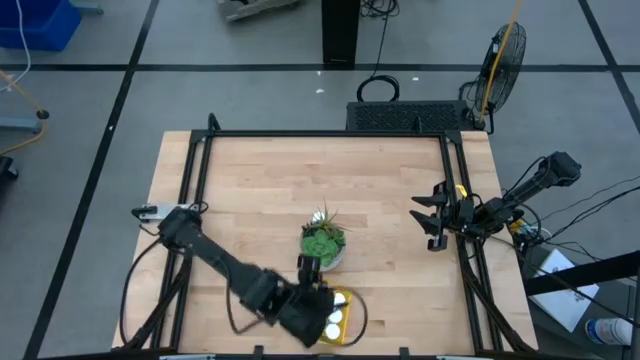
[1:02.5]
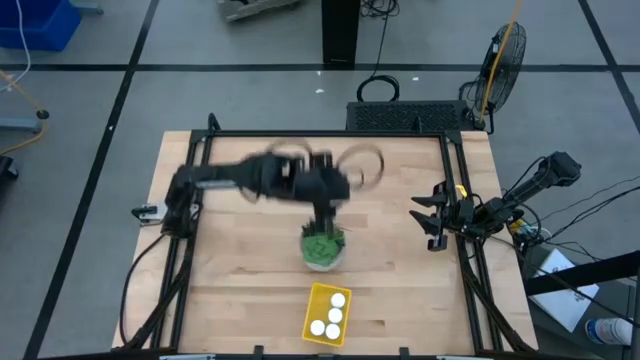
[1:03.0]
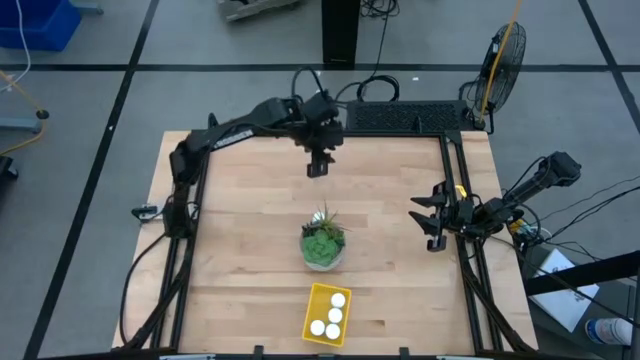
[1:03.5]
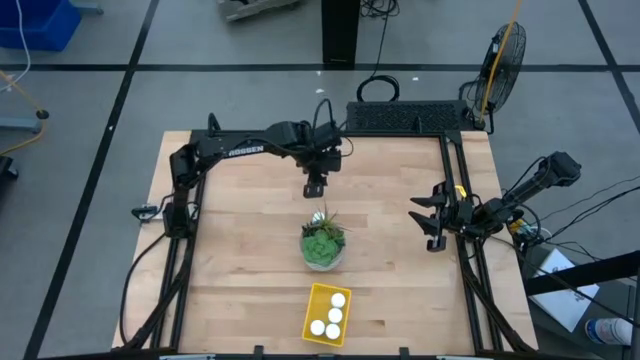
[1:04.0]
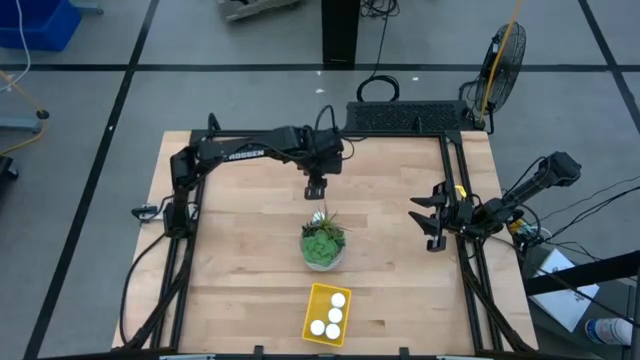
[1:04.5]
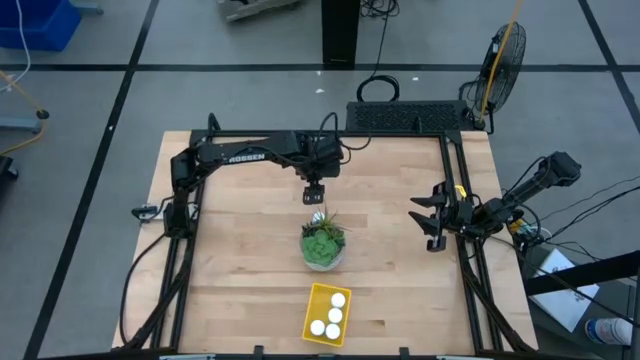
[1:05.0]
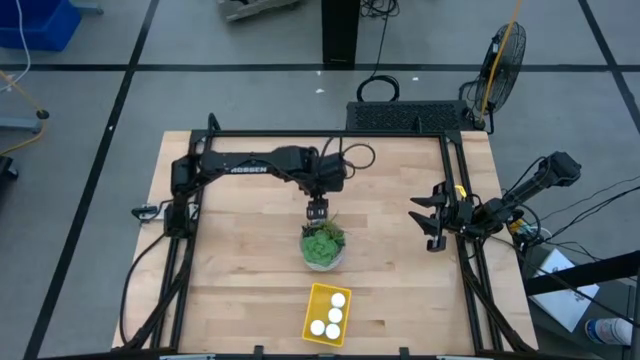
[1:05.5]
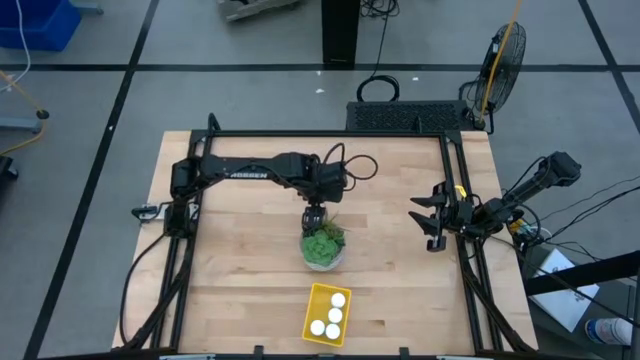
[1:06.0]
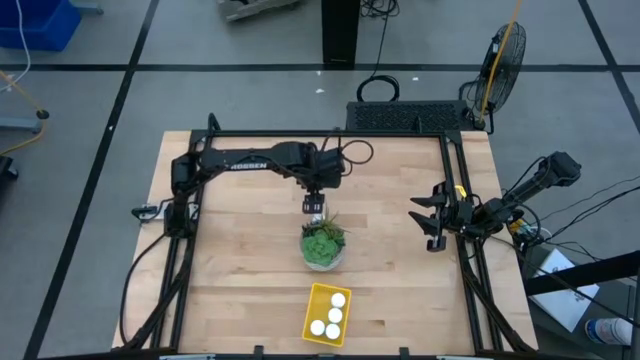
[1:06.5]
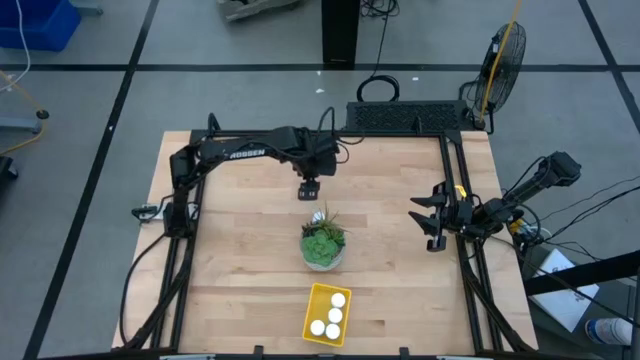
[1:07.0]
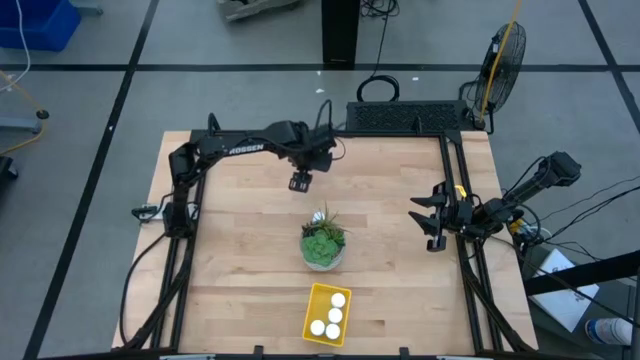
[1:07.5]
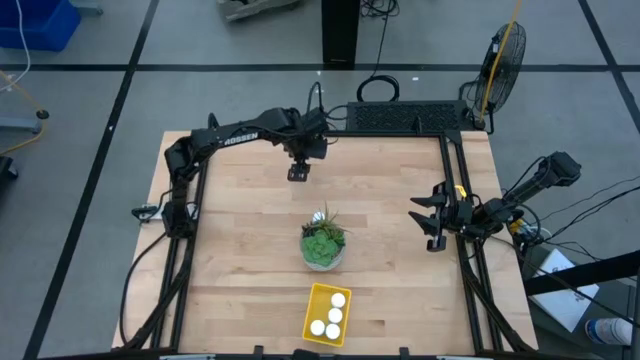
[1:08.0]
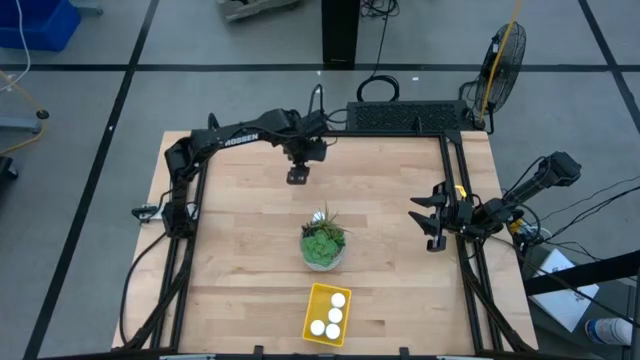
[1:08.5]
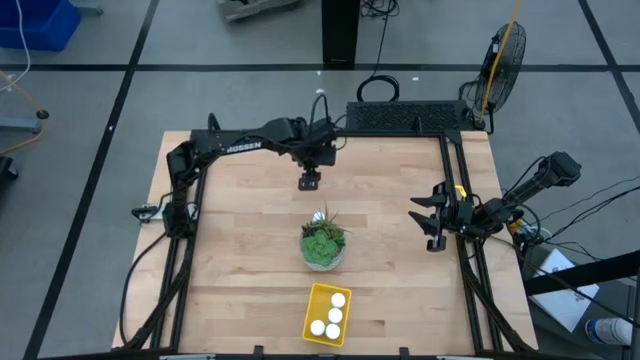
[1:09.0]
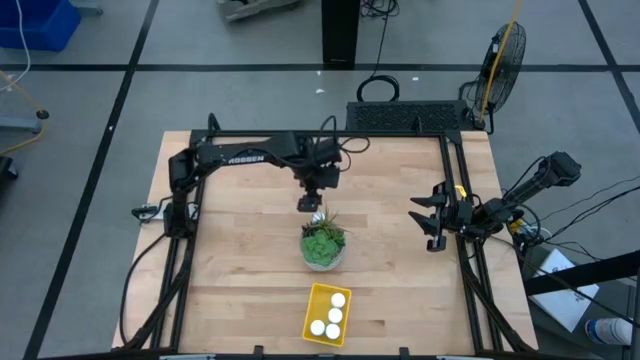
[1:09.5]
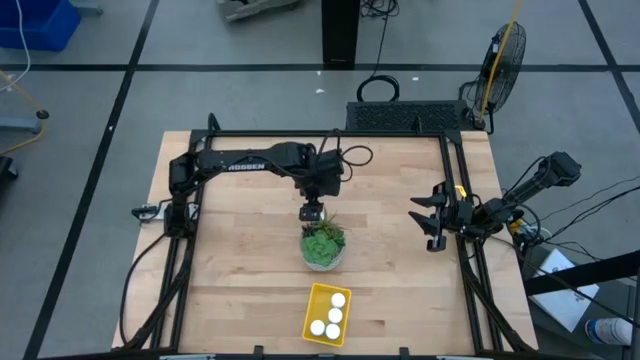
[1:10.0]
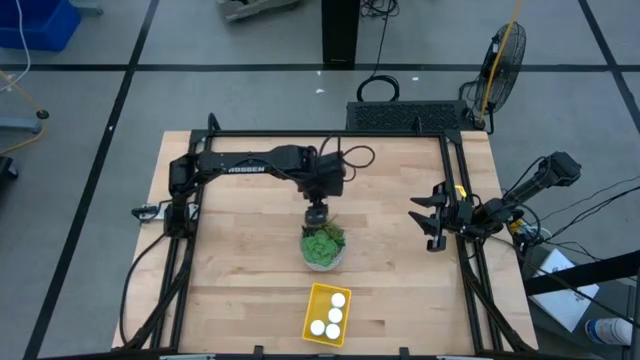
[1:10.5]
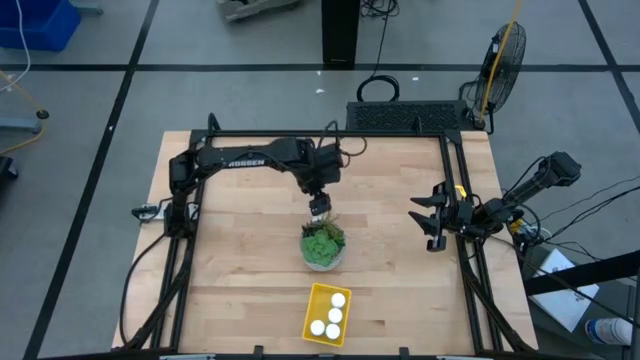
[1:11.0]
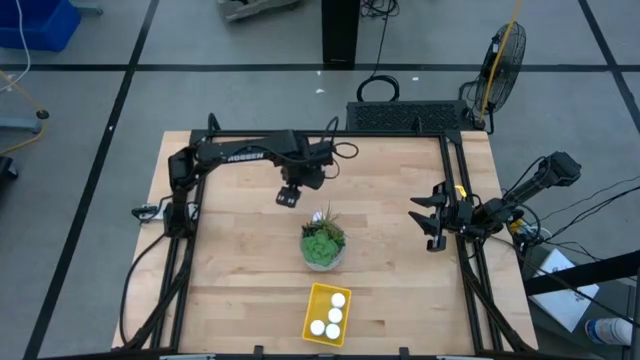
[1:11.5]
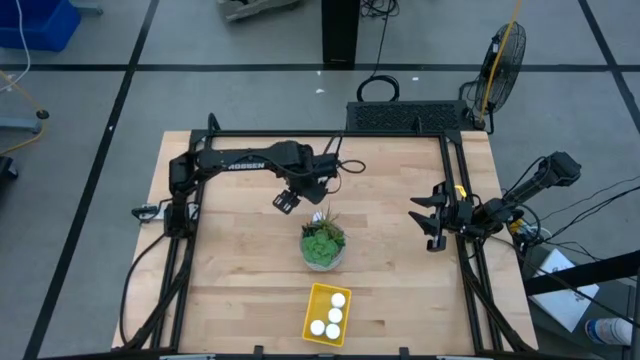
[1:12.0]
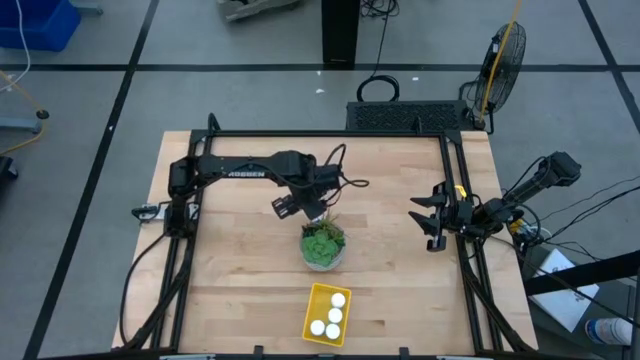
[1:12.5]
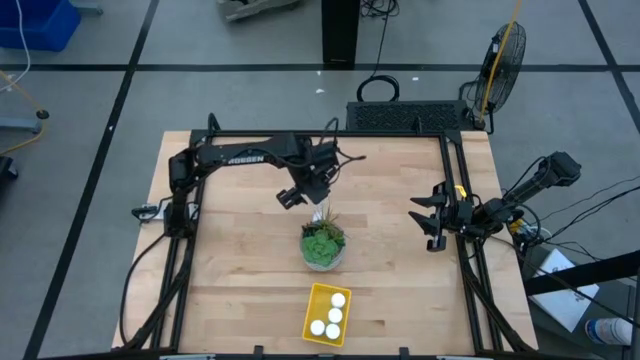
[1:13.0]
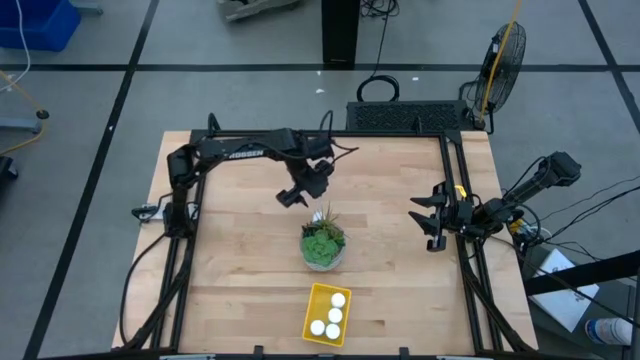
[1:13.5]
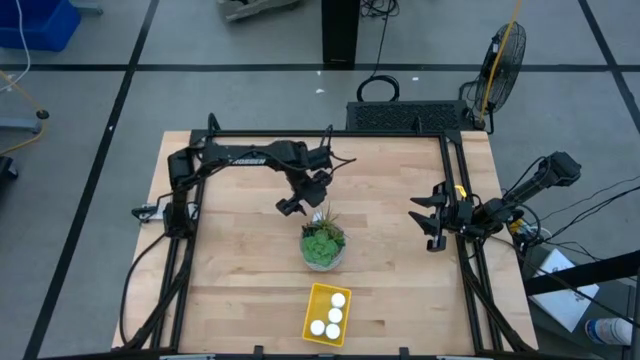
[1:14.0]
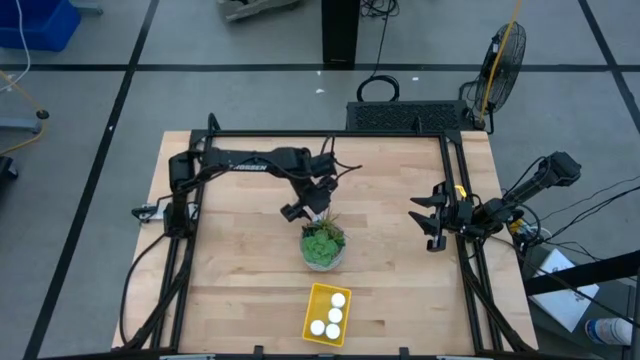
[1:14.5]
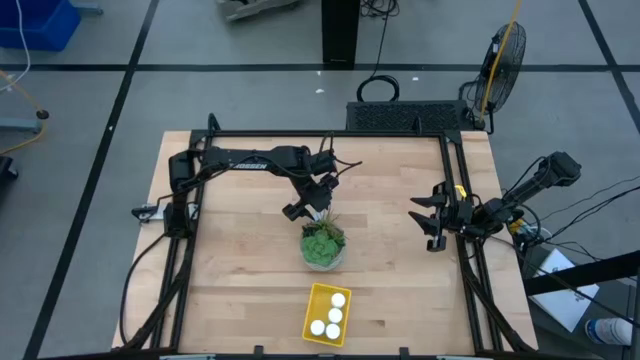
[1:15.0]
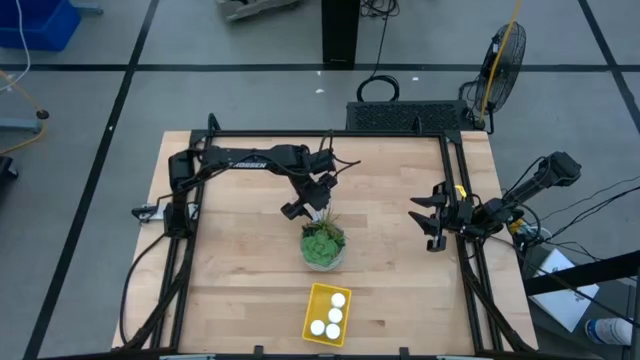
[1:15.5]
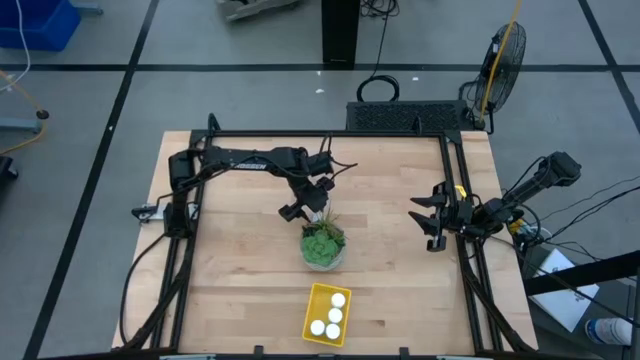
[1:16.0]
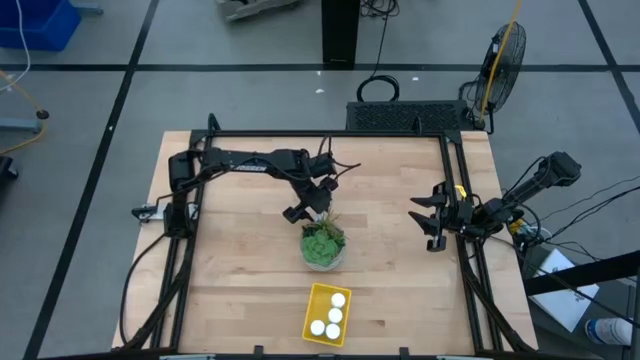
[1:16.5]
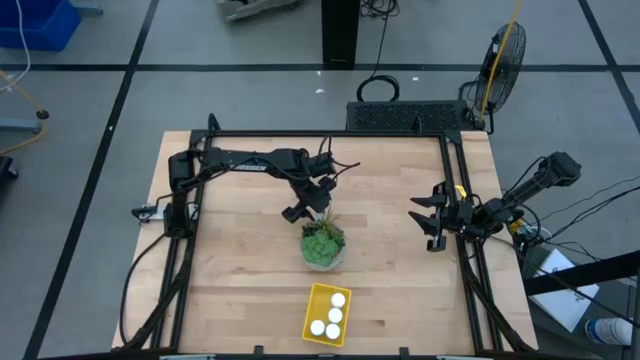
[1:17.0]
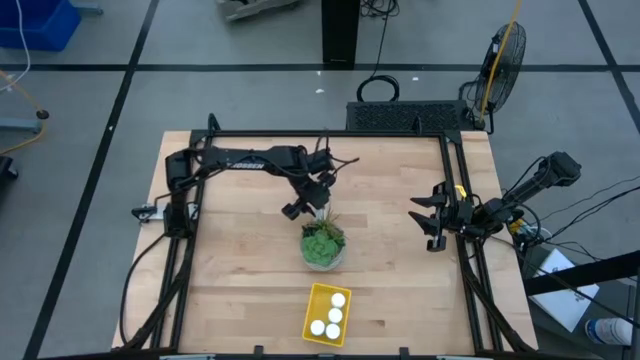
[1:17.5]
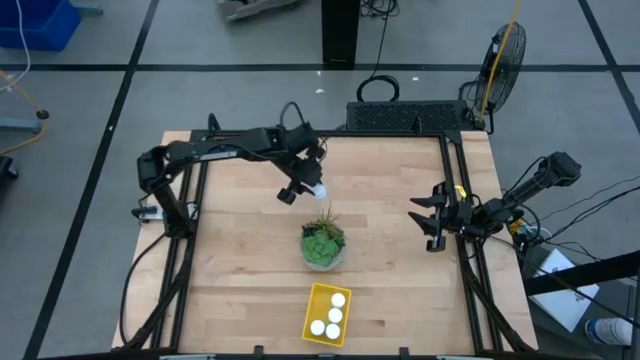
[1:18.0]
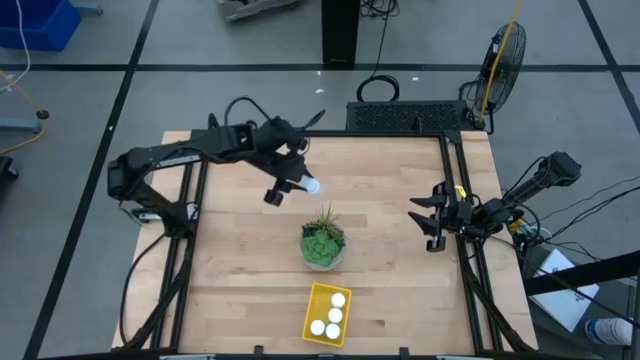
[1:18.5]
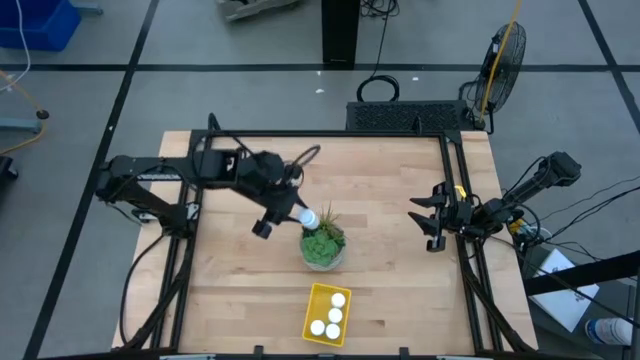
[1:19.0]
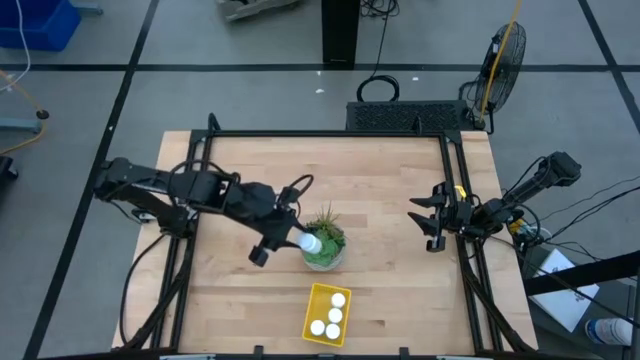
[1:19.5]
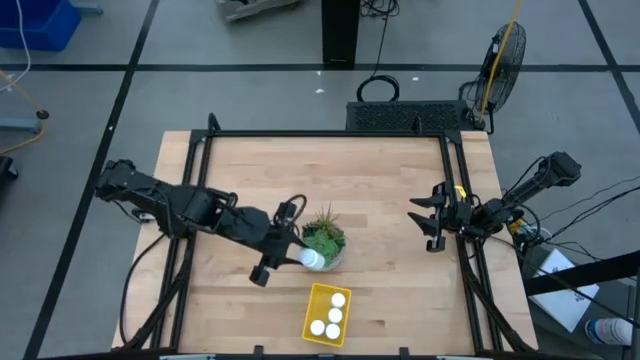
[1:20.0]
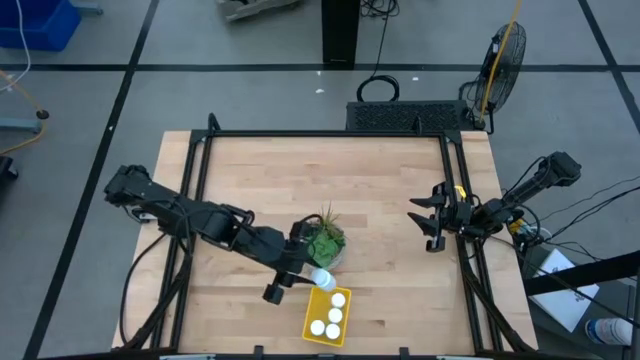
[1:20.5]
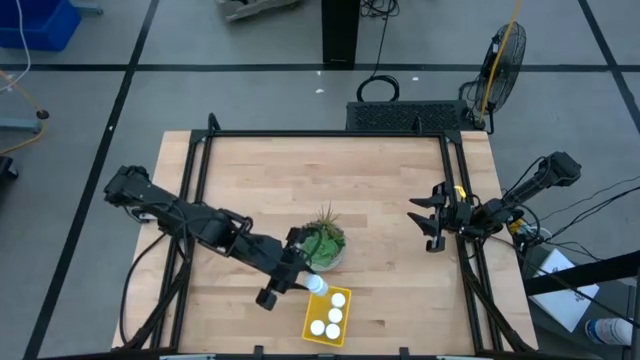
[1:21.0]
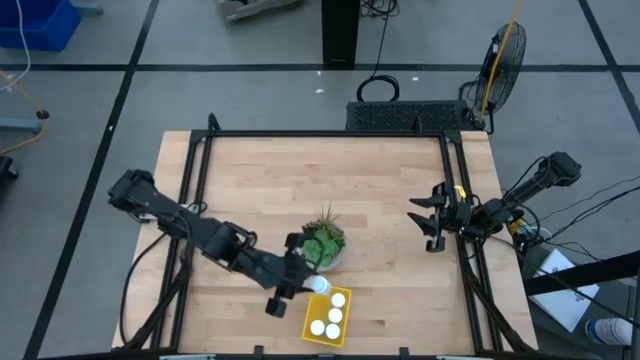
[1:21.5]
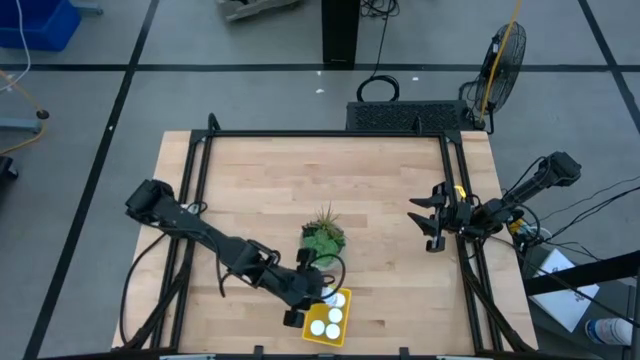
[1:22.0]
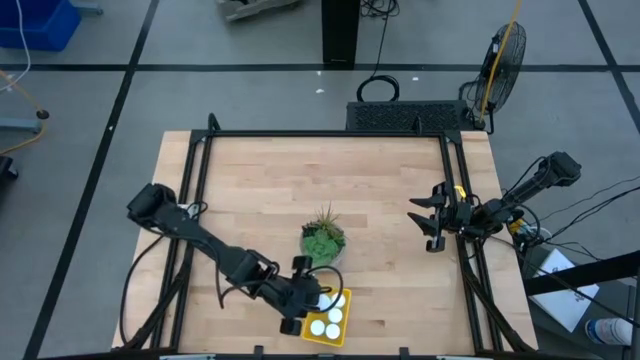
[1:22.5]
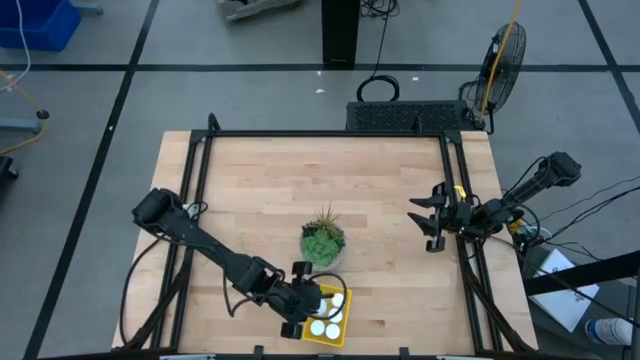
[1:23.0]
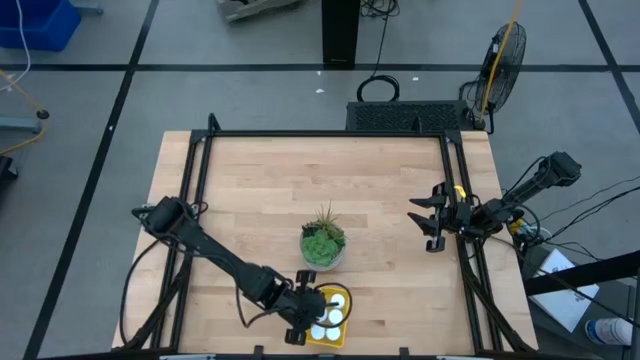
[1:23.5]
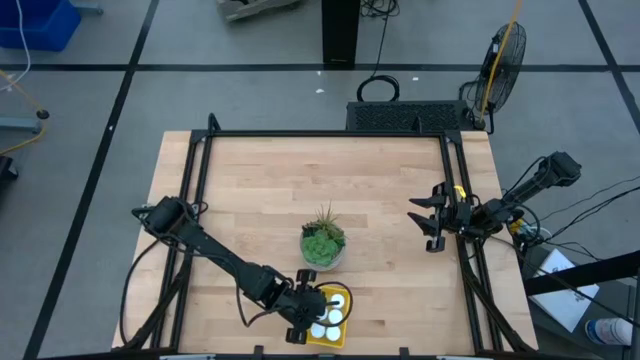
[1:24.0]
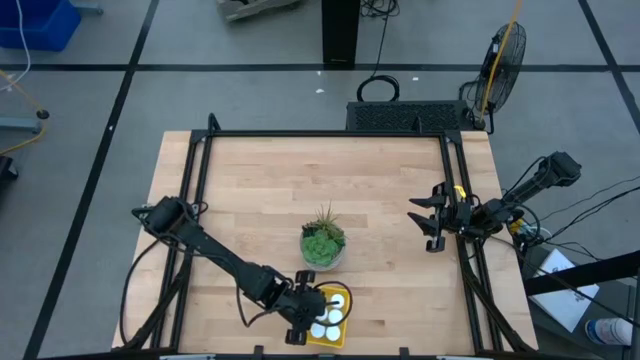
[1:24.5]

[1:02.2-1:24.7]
Task: Pick and place pill bottles into a basket
Put the white pill bottle into the yellow bin
